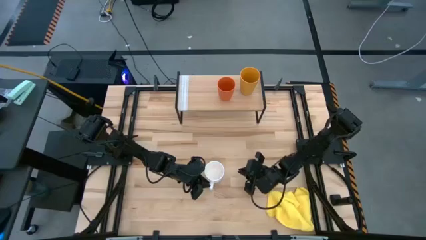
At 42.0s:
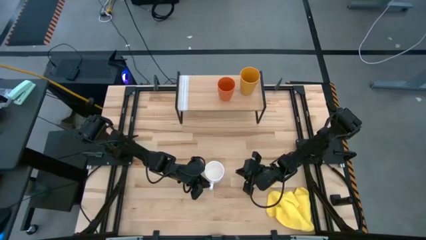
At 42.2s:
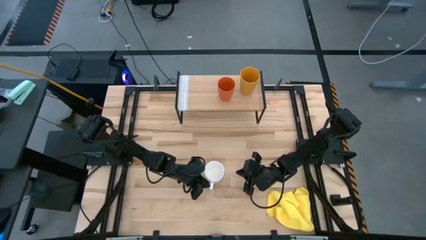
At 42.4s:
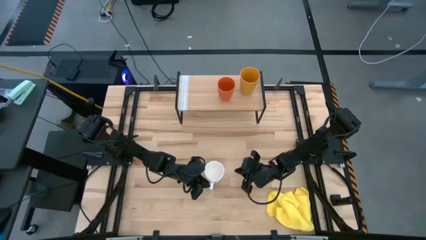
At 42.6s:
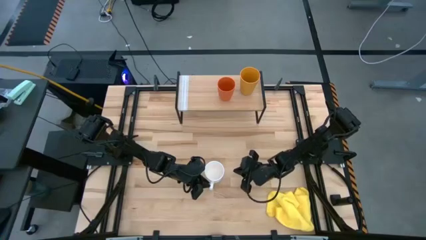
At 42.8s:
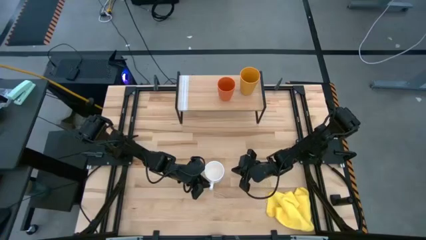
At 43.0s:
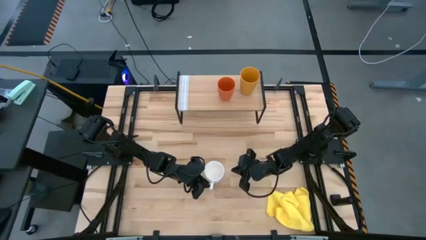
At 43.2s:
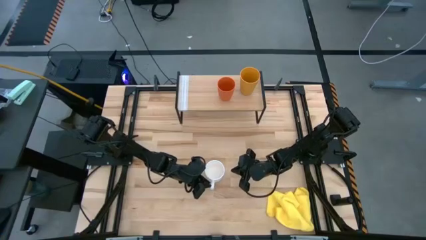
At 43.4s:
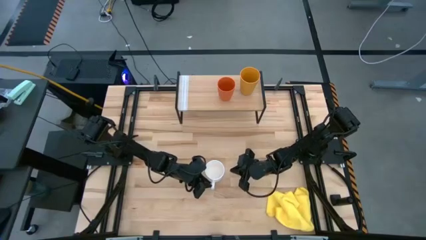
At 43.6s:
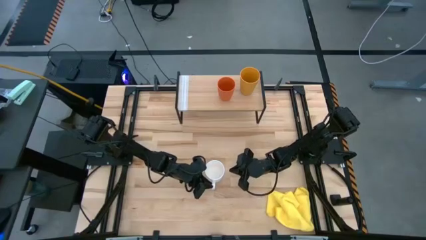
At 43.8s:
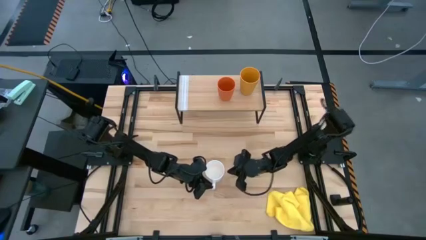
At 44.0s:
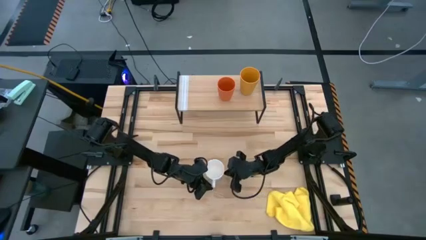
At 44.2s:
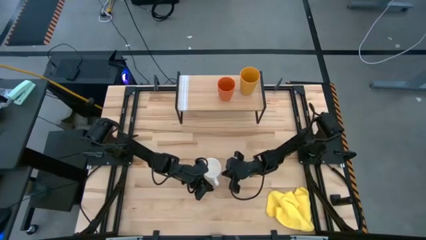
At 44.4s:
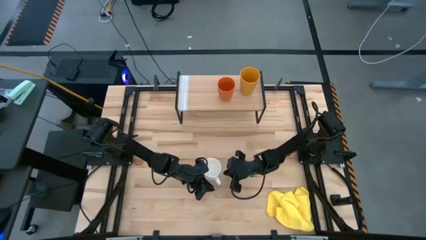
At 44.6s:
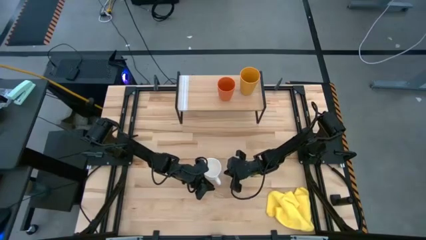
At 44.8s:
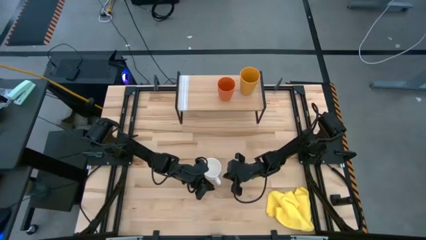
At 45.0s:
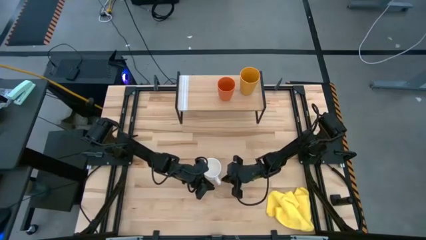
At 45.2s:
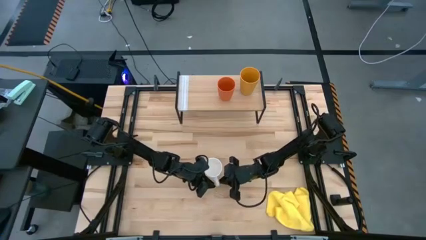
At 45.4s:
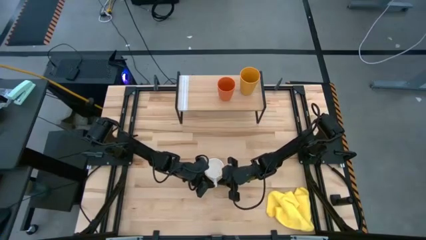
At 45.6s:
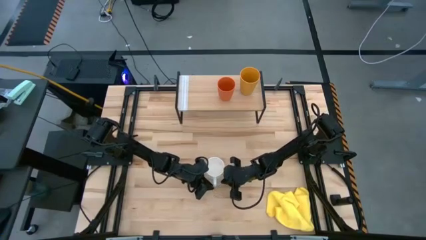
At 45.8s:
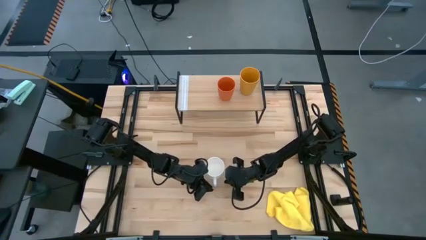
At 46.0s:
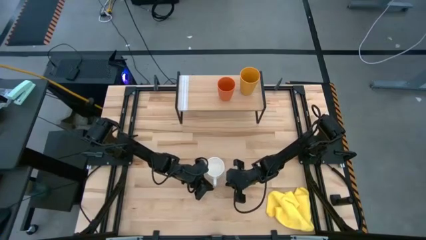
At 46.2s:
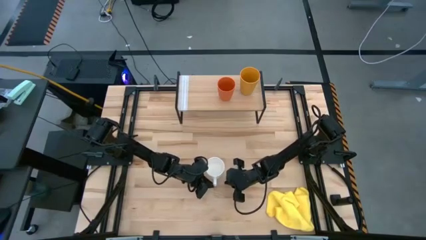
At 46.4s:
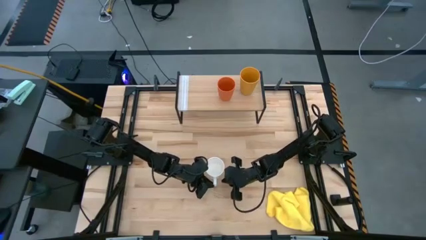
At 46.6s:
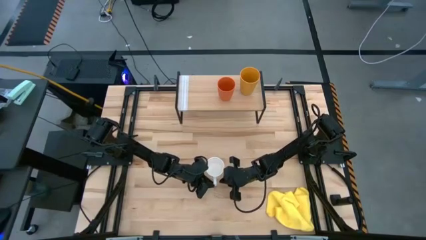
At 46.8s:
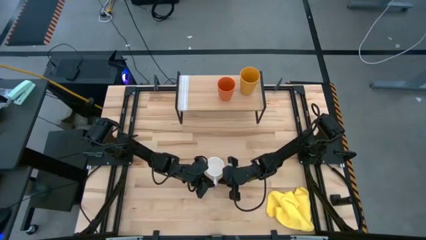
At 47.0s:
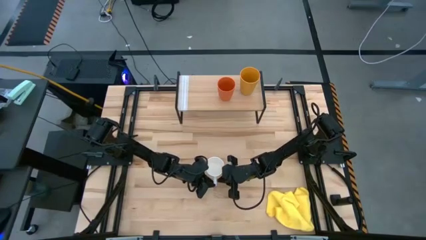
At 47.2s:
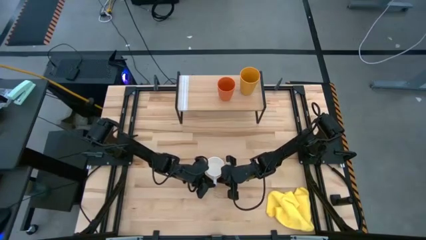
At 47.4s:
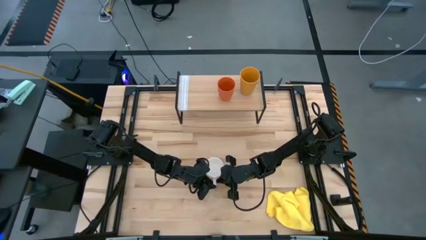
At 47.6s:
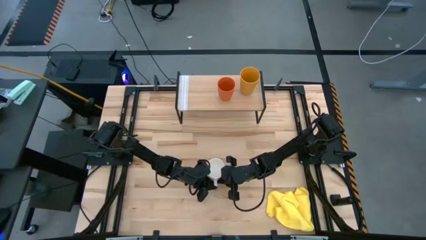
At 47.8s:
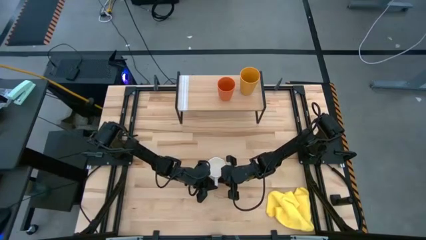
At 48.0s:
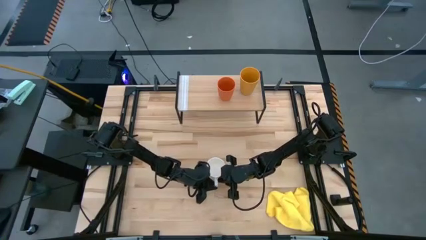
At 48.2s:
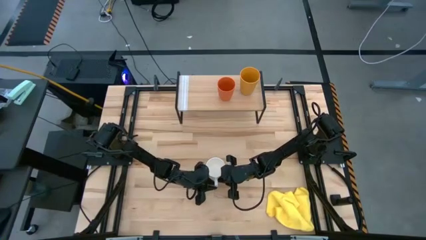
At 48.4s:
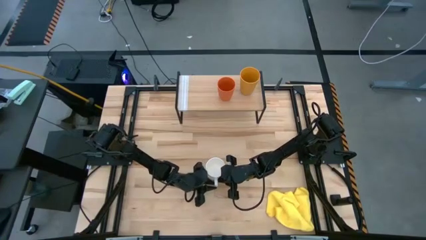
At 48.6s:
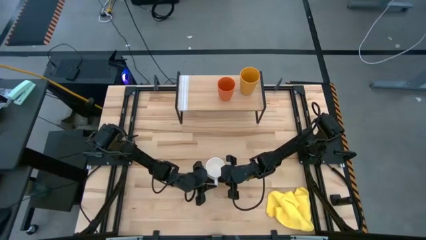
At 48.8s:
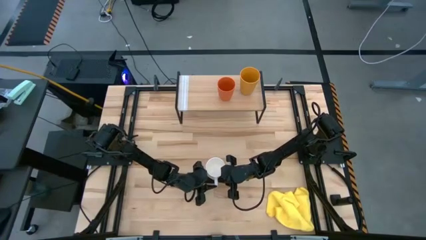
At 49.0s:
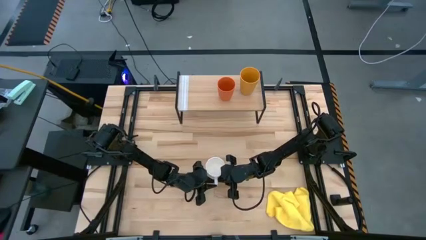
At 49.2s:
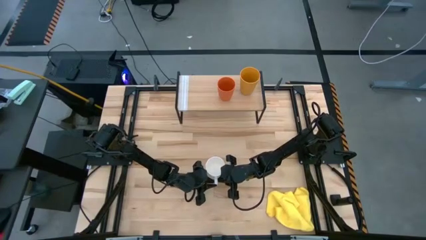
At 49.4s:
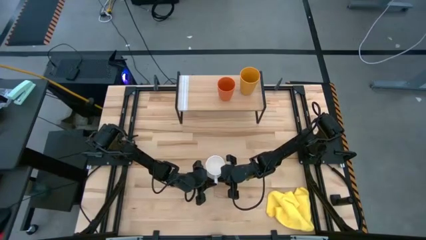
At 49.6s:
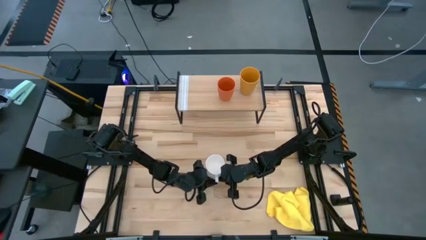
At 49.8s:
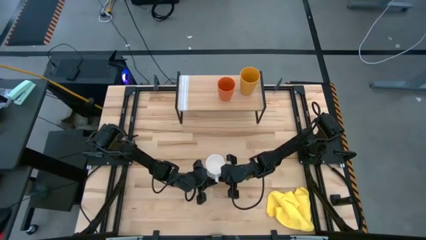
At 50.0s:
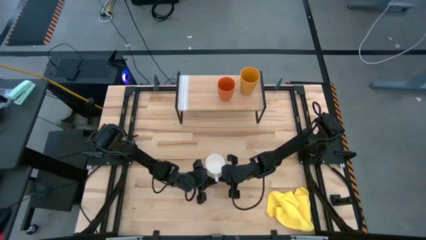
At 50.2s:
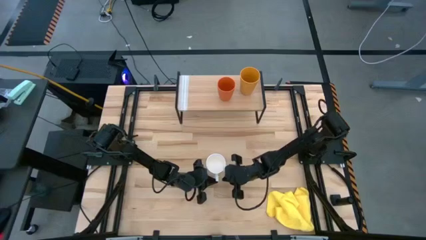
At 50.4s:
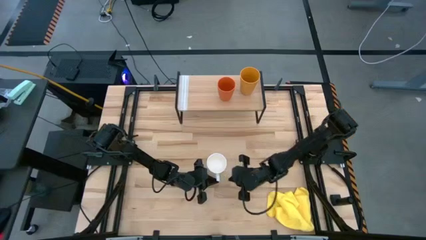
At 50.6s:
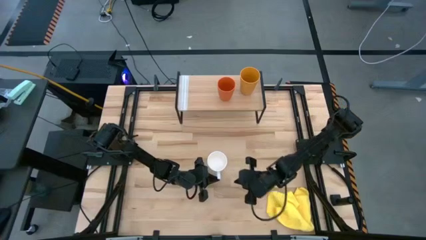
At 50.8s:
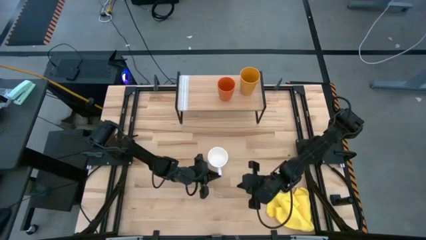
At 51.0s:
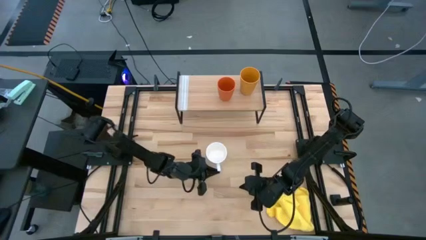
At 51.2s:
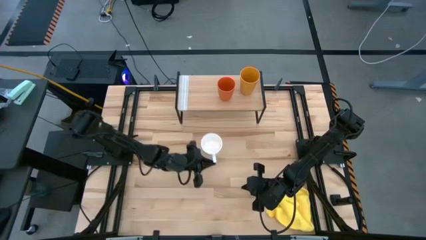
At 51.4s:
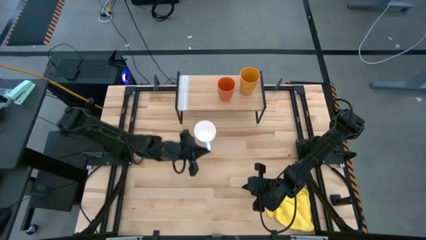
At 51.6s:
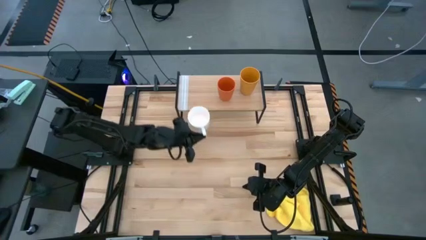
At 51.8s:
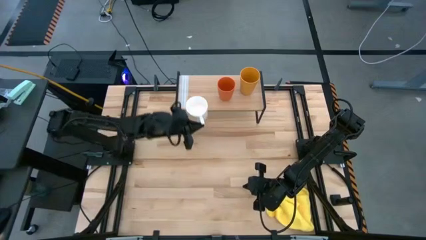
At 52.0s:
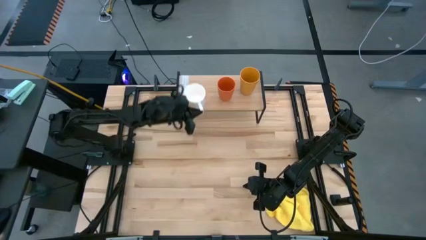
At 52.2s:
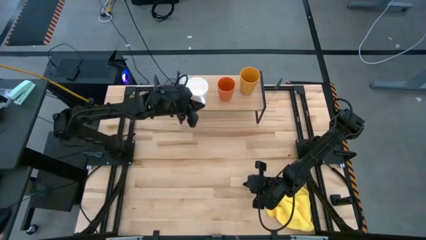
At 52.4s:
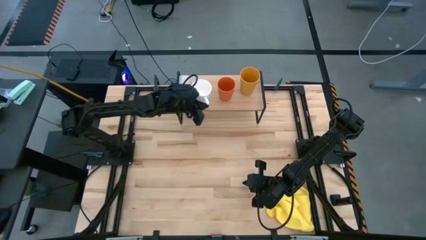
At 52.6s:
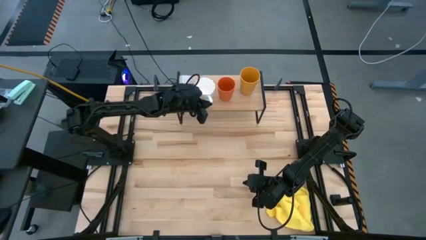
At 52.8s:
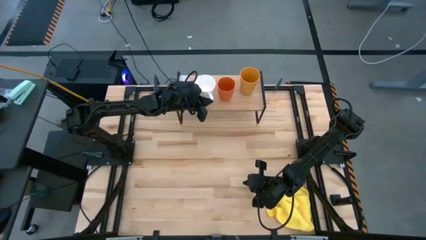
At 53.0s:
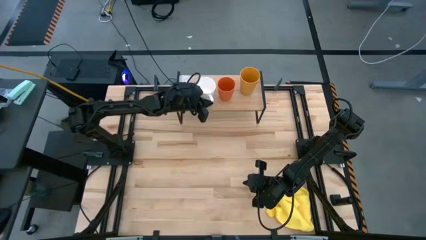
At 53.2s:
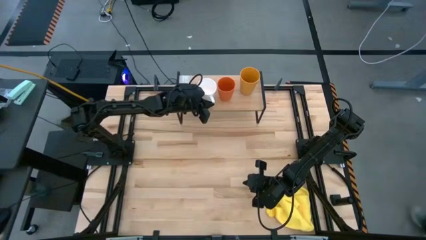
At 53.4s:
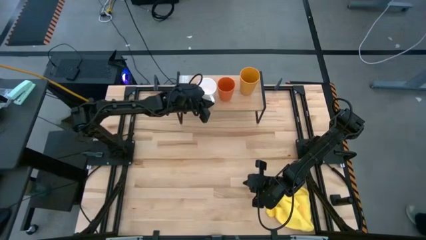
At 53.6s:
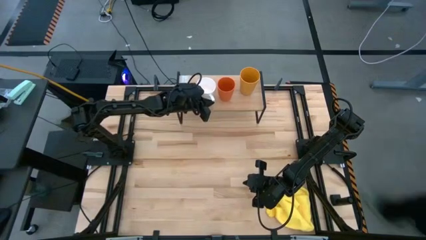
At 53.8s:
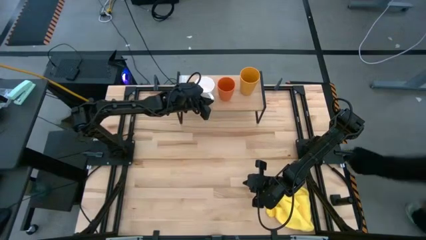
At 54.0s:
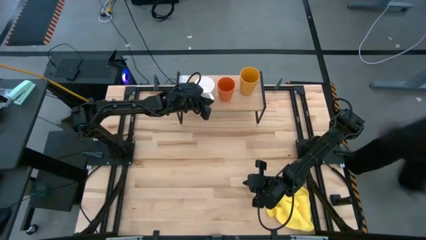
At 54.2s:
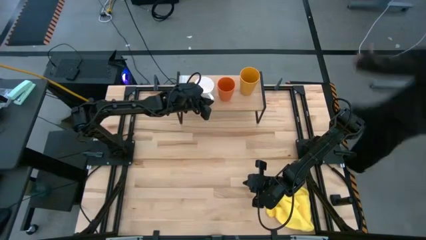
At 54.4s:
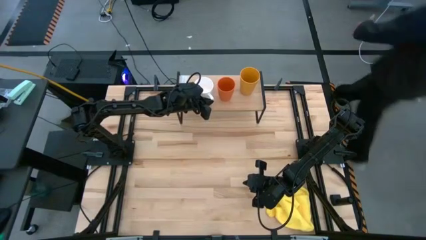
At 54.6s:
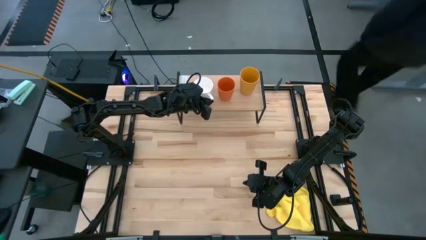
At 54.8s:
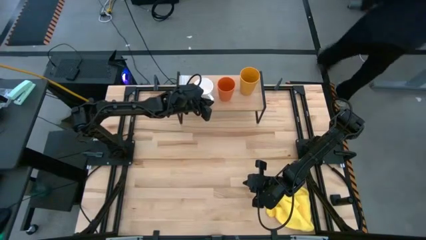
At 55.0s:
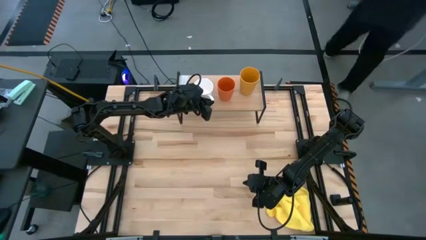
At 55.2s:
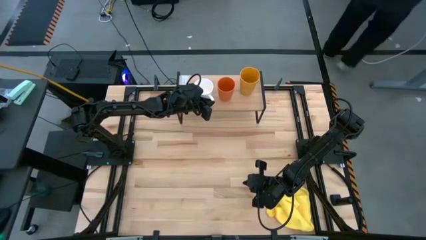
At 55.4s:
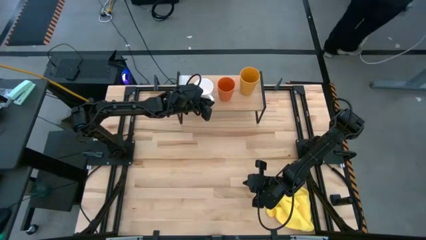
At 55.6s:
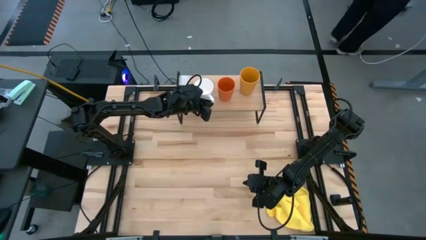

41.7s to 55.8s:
Task: Stack small to large cups/mugs on shelf
Put the white mug on the shelf
